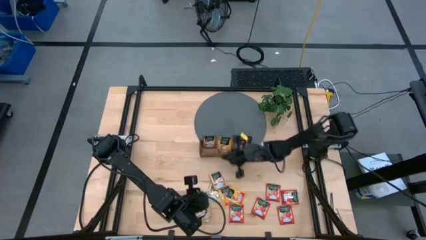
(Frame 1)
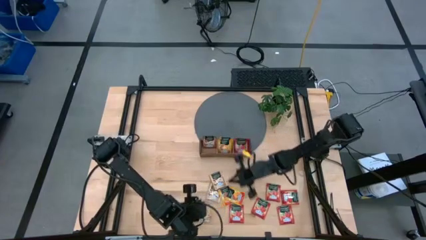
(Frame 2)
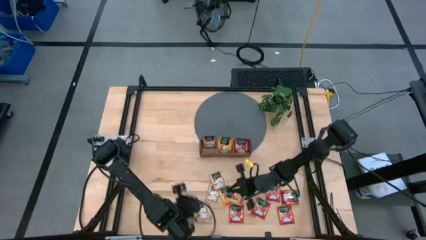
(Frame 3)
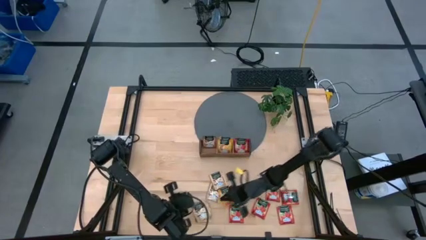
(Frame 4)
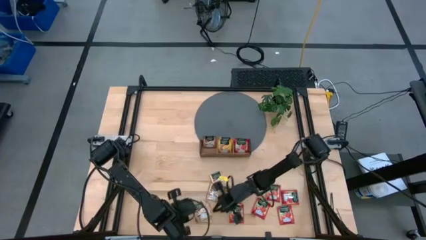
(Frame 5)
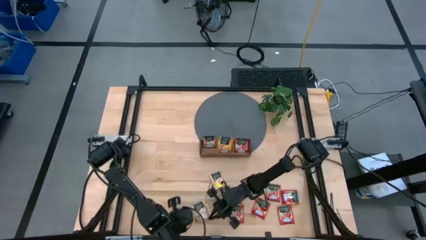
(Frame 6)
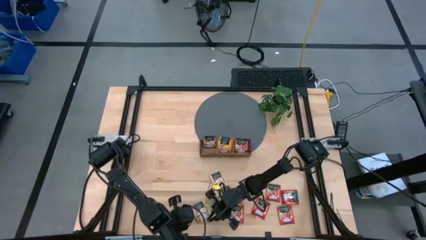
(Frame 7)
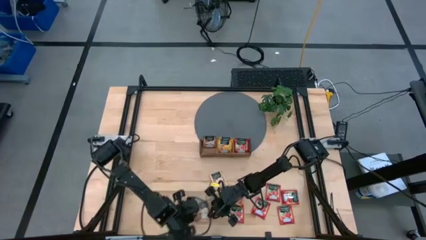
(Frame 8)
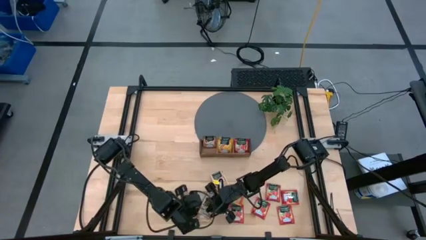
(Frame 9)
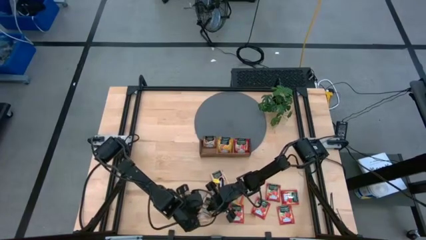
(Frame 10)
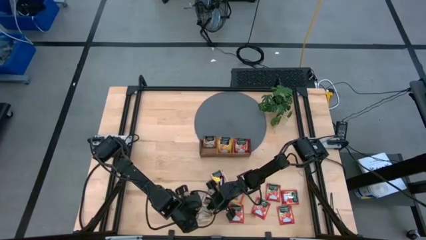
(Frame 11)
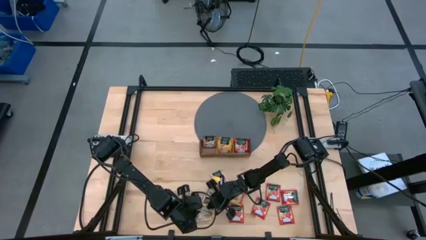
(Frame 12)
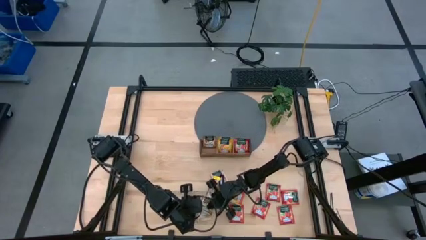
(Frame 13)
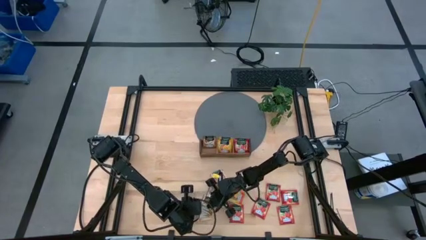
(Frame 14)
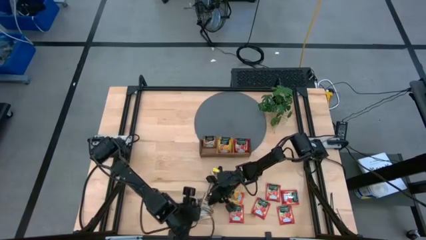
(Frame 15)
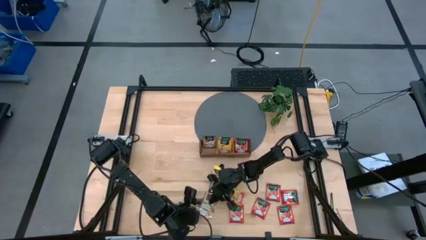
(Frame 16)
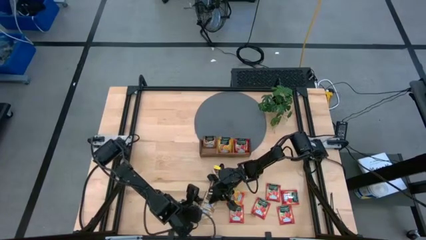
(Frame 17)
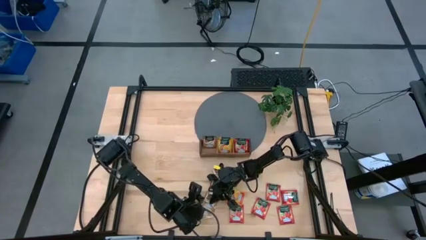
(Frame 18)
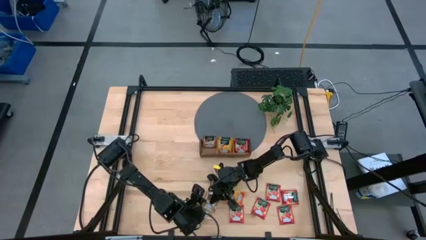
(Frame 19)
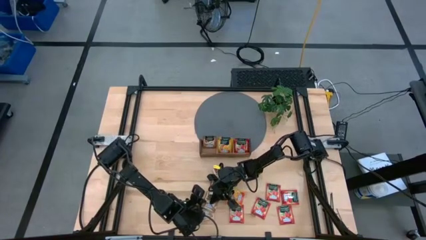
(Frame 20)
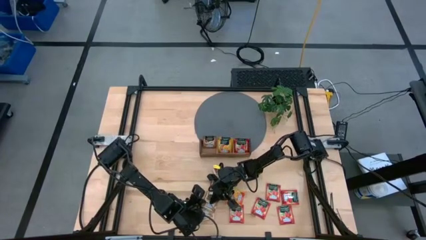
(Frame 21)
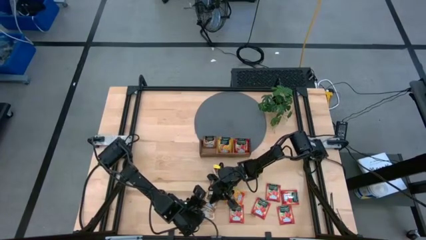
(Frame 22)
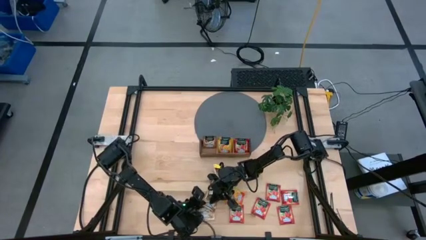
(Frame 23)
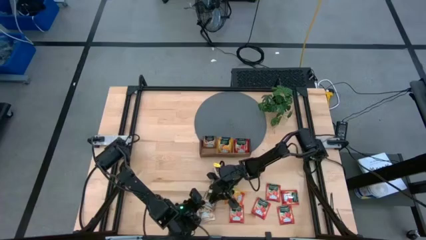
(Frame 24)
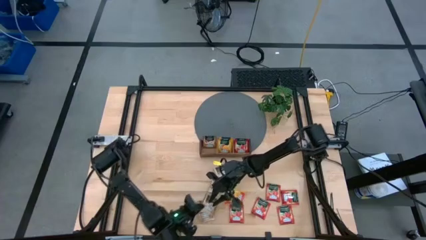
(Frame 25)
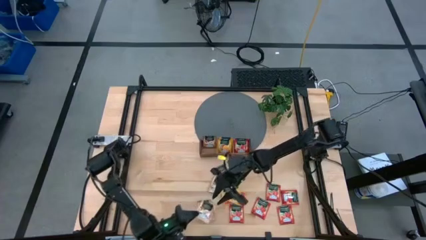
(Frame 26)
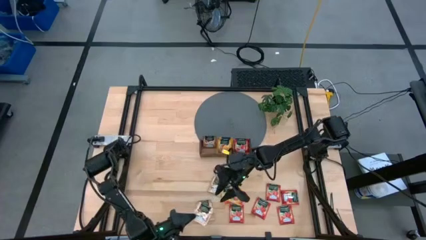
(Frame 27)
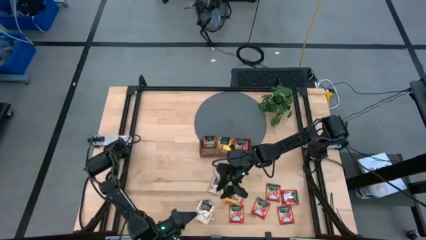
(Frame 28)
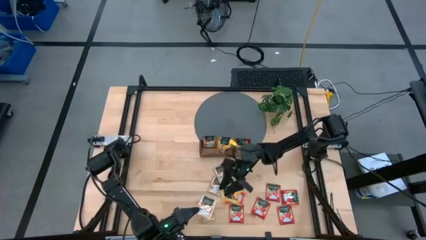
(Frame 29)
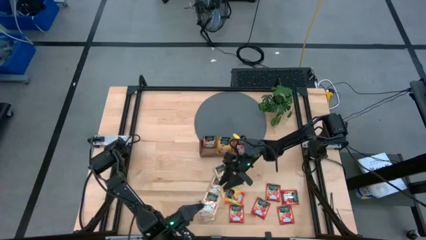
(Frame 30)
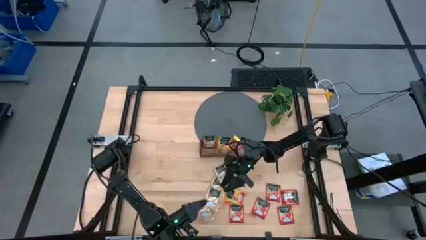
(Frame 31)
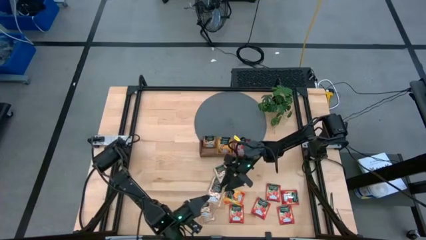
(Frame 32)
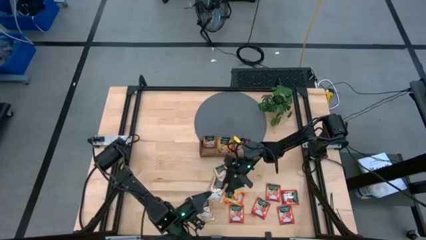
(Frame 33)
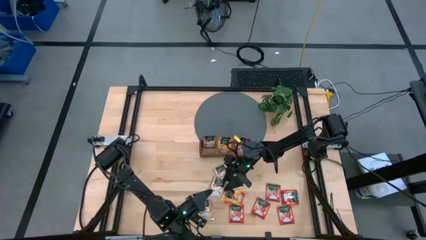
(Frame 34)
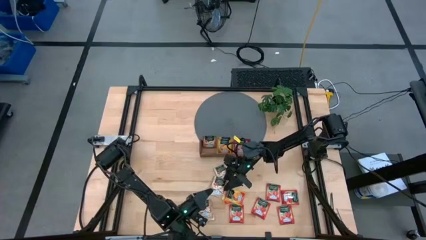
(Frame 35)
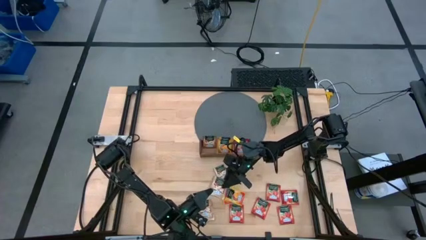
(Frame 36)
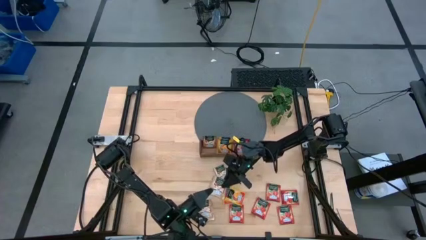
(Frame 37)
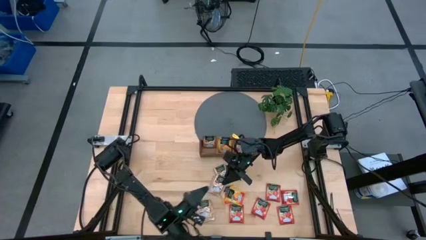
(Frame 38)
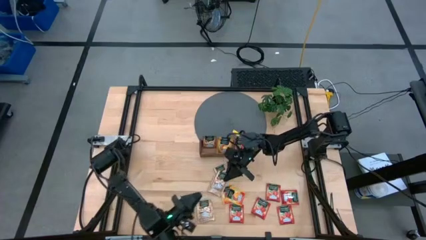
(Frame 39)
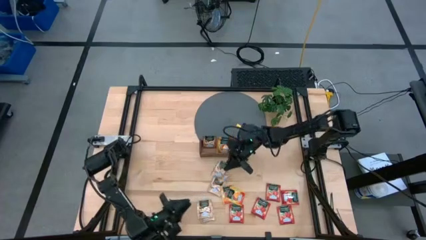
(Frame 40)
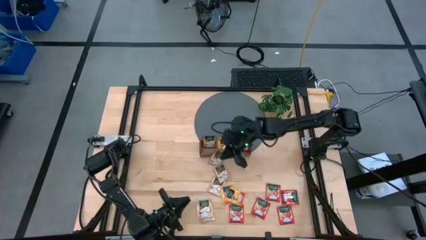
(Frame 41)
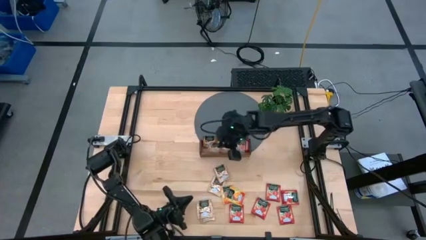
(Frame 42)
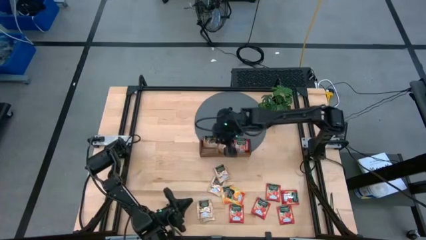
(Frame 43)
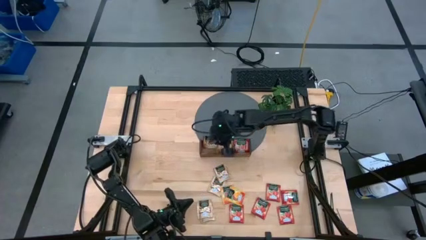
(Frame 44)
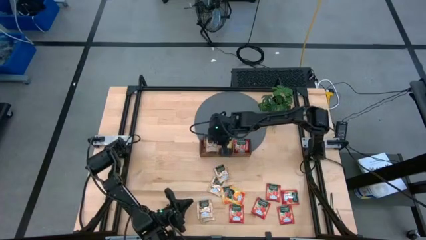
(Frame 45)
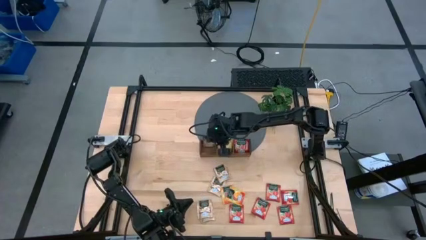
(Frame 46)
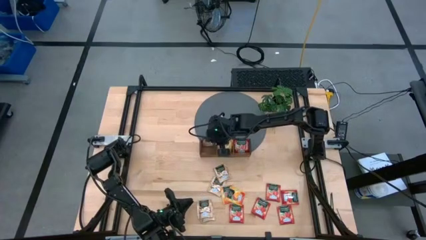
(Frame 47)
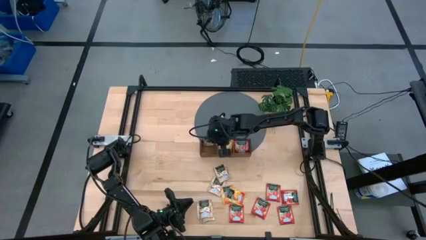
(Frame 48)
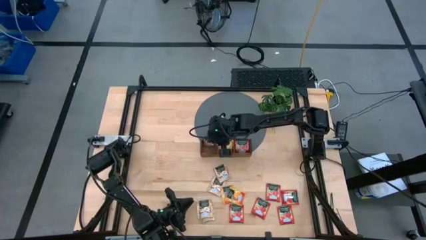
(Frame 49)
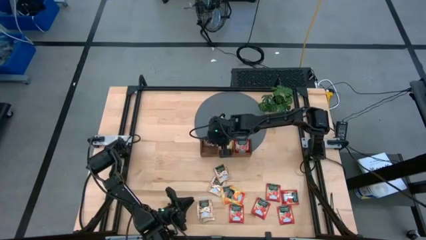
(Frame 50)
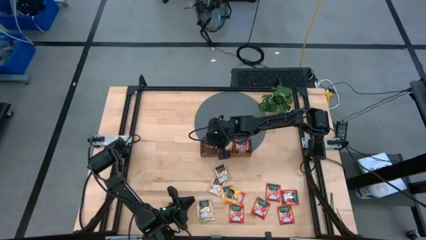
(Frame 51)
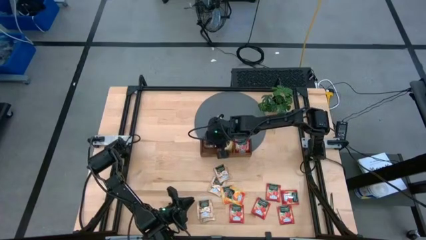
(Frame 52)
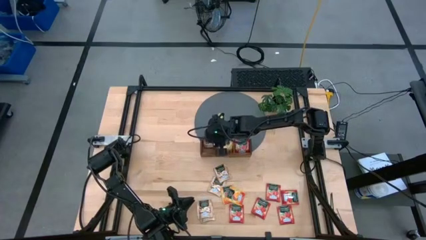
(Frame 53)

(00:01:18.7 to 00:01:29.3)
Task: Pick & Place Tea
Put the brown tea bag into the left wooden organizer
